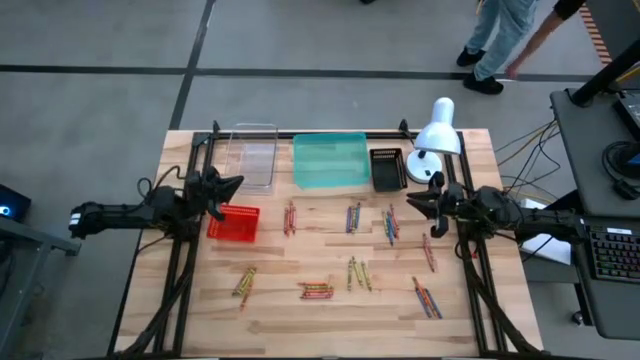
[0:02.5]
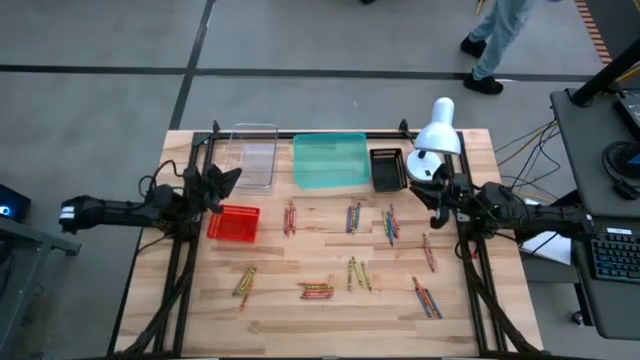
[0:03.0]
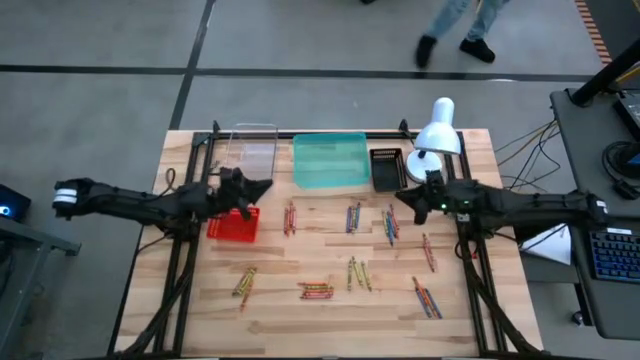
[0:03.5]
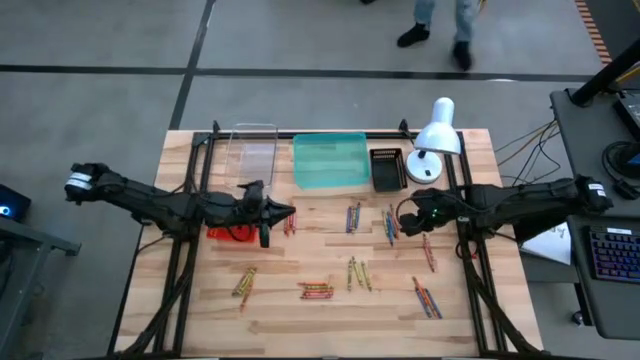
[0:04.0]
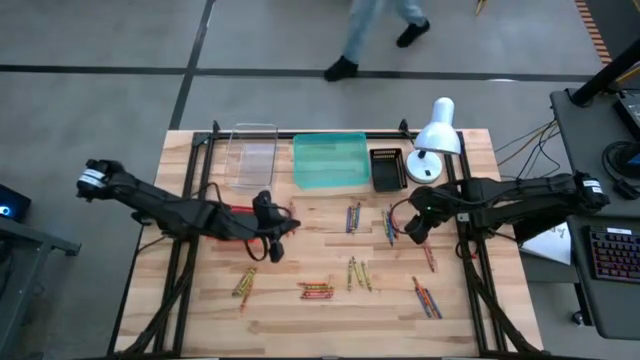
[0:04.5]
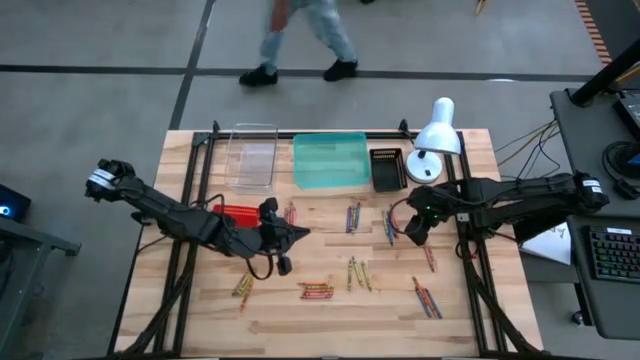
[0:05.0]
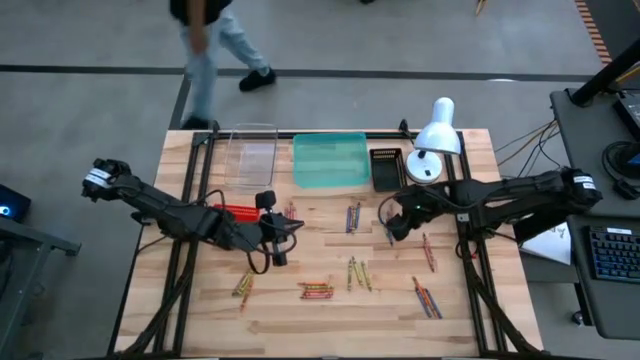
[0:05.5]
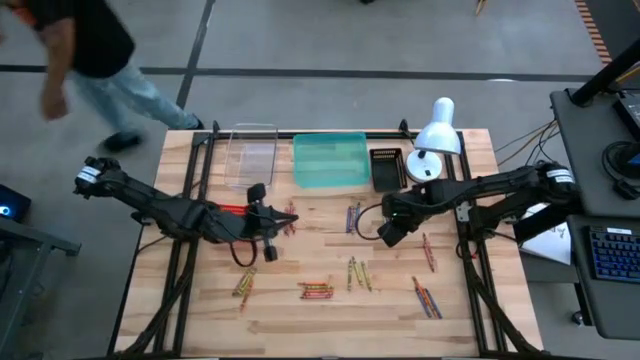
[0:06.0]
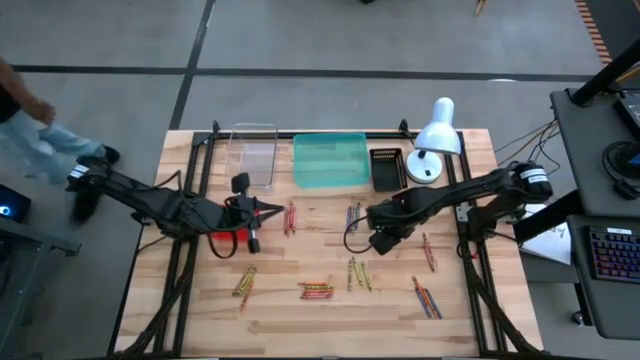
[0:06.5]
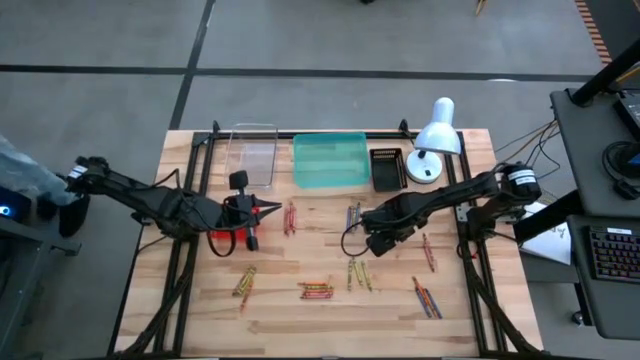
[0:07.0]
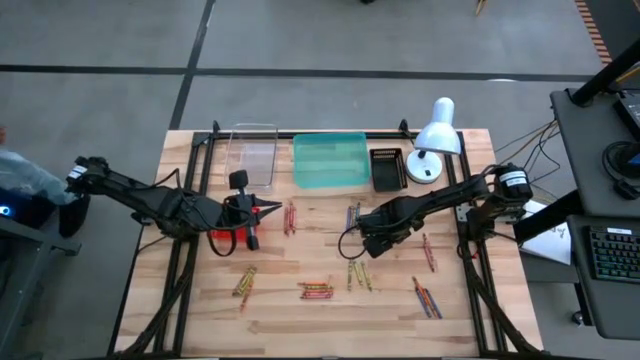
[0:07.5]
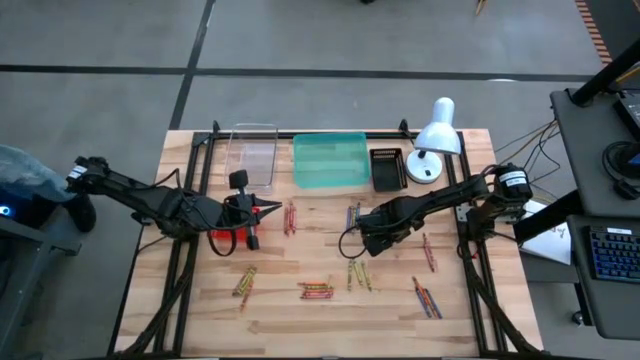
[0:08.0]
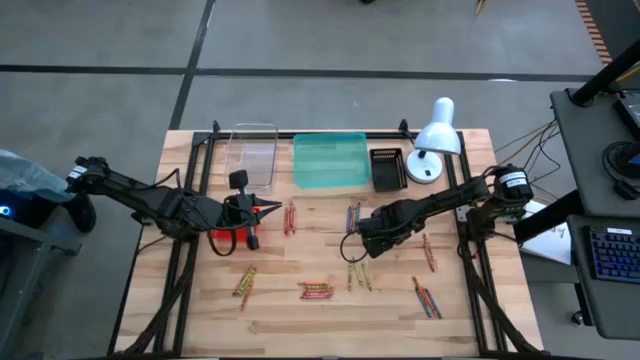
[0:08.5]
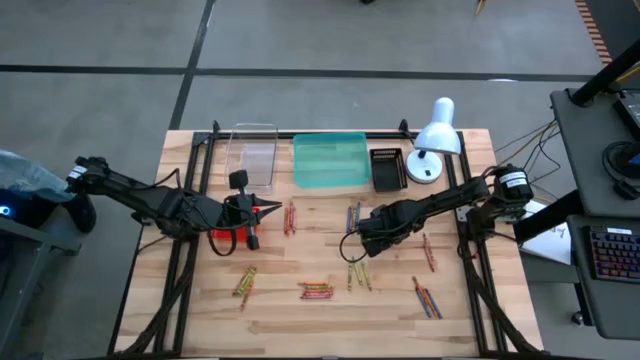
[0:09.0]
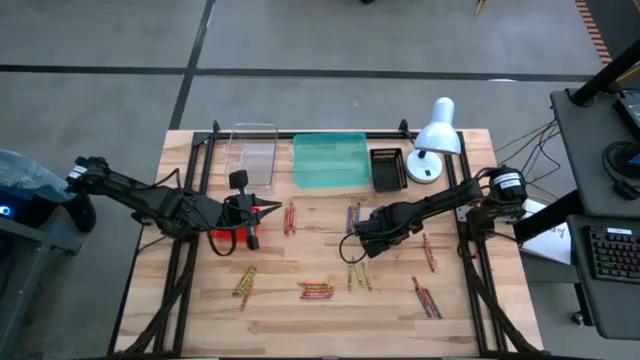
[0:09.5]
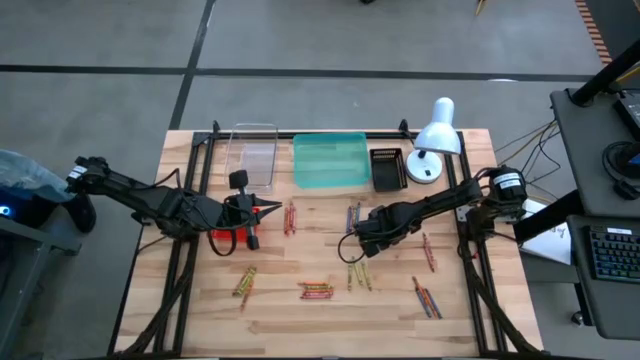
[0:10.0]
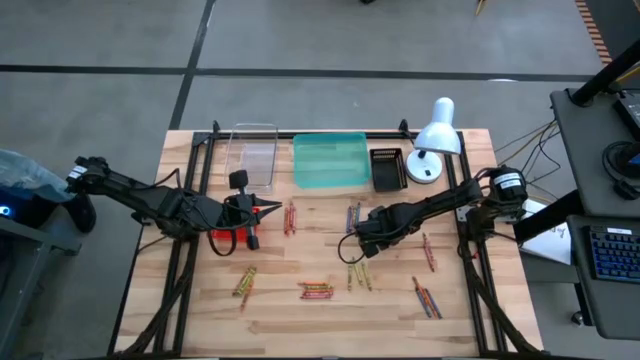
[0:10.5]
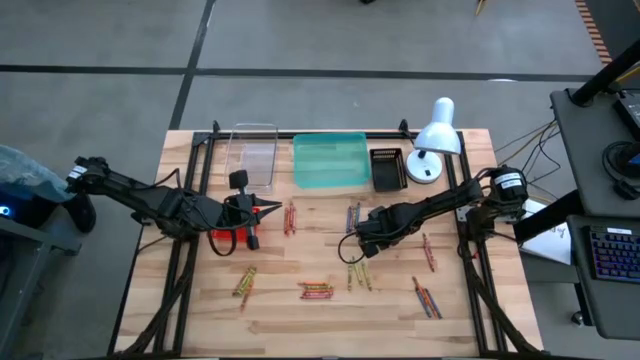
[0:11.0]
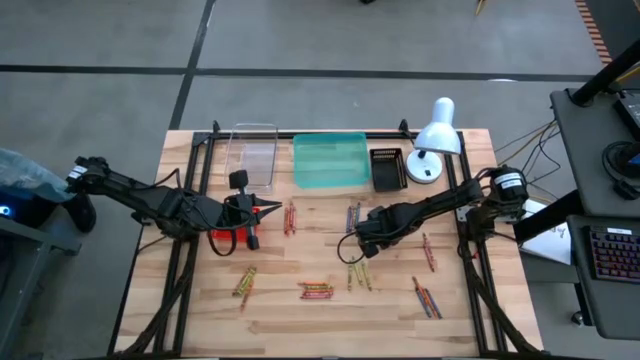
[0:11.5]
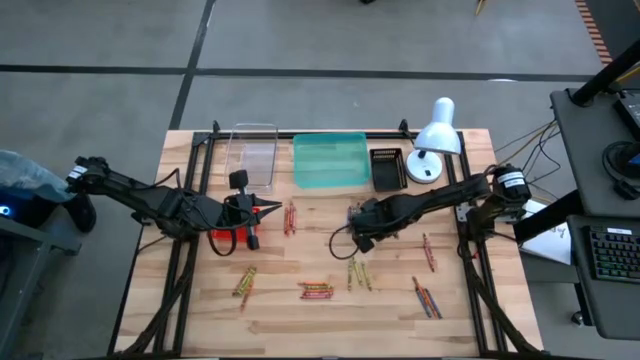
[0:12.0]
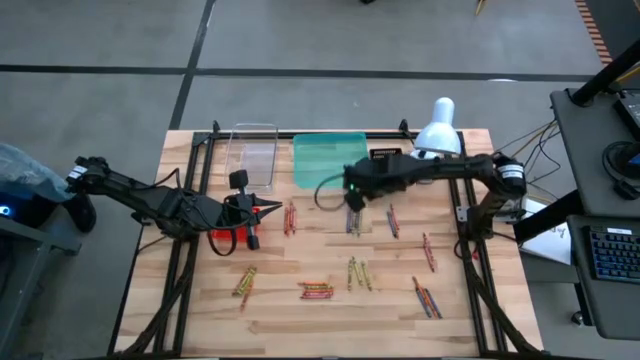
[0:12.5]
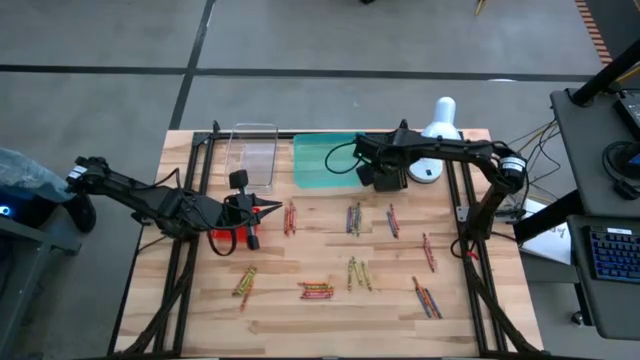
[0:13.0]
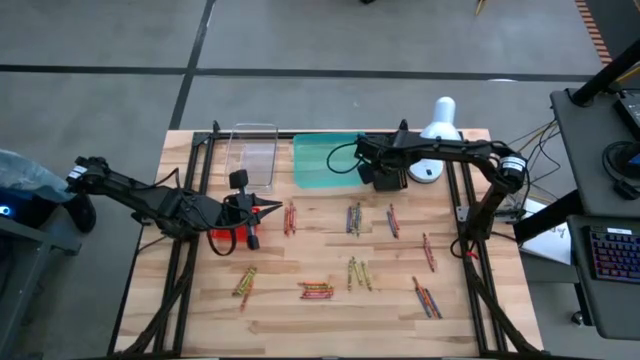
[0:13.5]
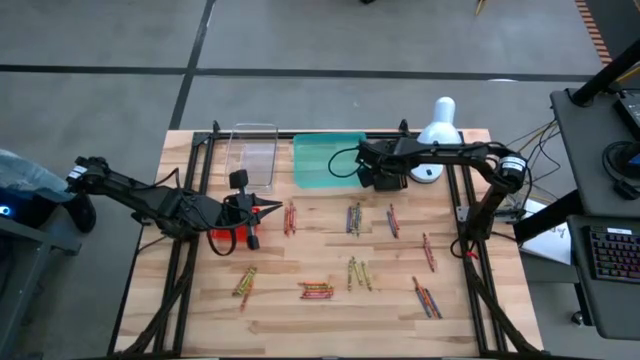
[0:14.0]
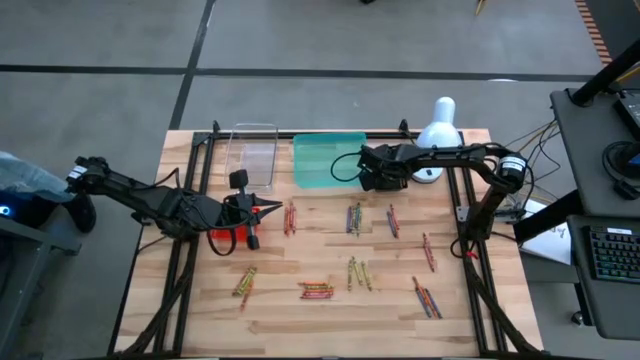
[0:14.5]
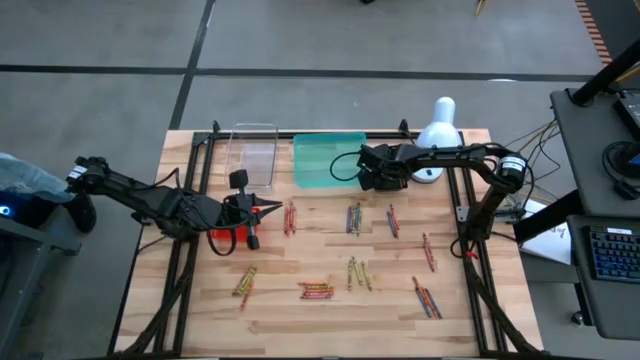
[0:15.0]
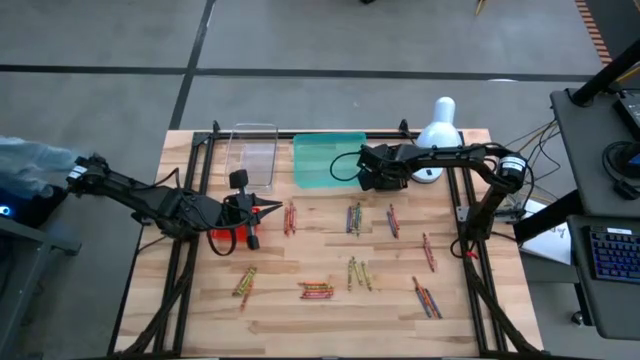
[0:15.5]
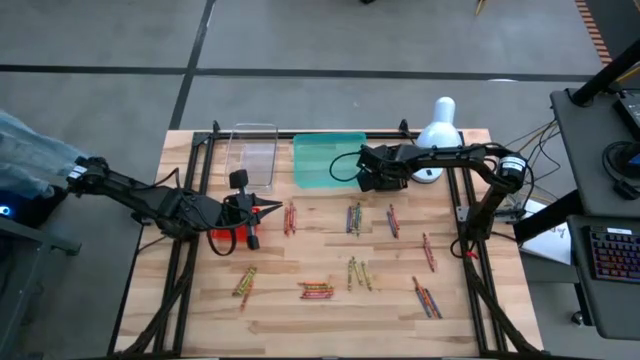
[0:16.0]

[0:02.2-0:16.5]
Task: Sort crayons
Put the blue crayon into the black bin

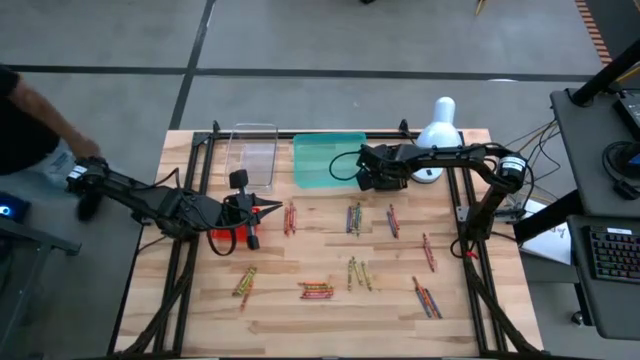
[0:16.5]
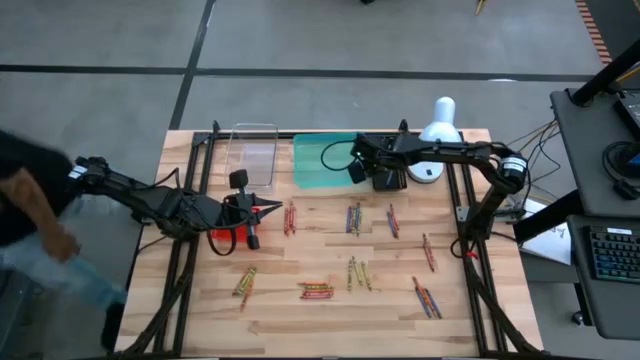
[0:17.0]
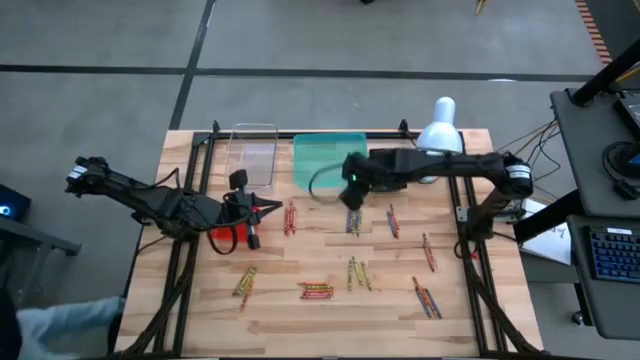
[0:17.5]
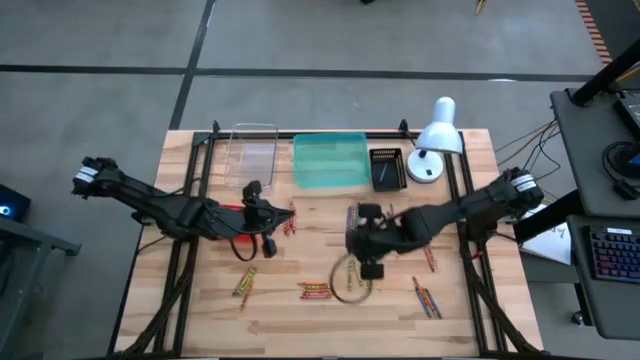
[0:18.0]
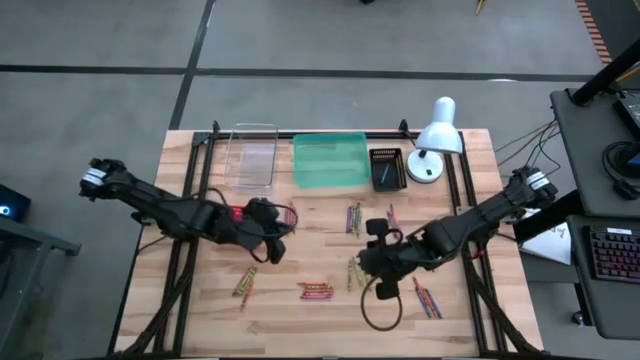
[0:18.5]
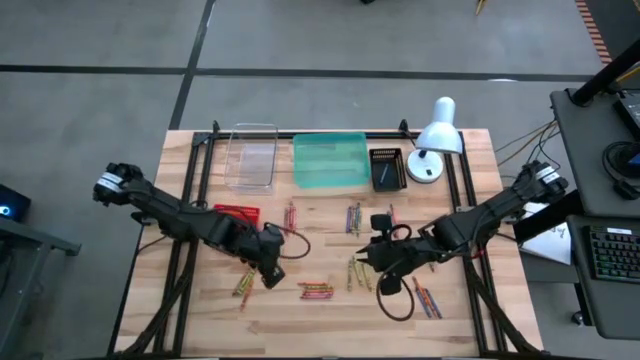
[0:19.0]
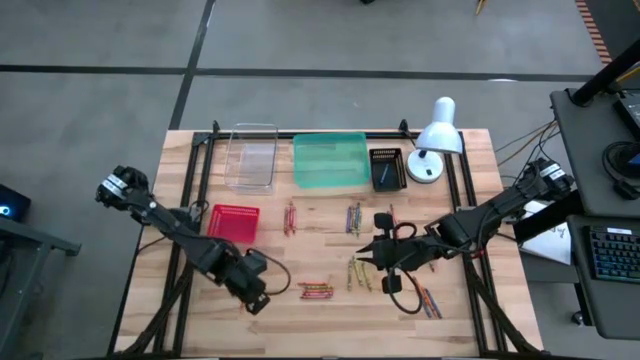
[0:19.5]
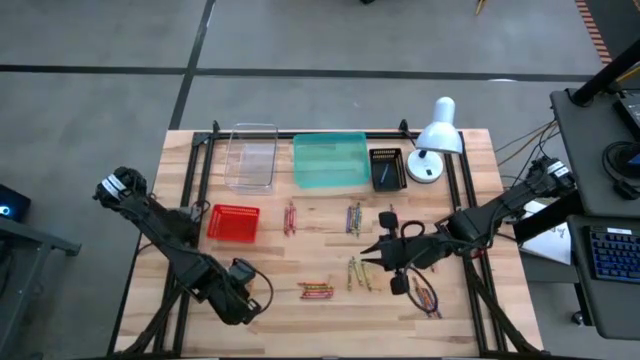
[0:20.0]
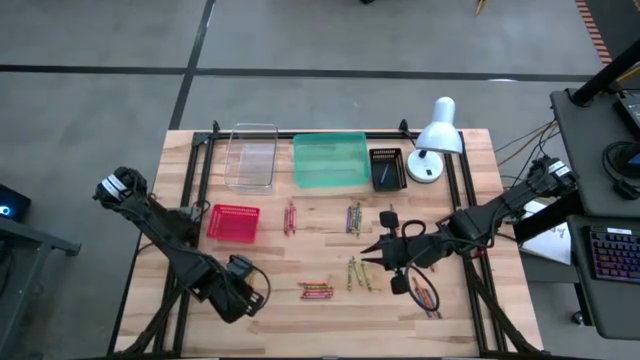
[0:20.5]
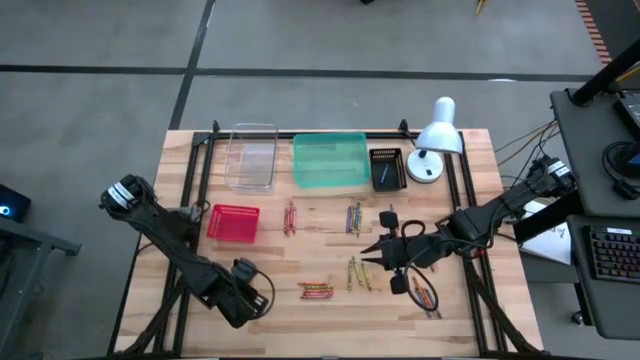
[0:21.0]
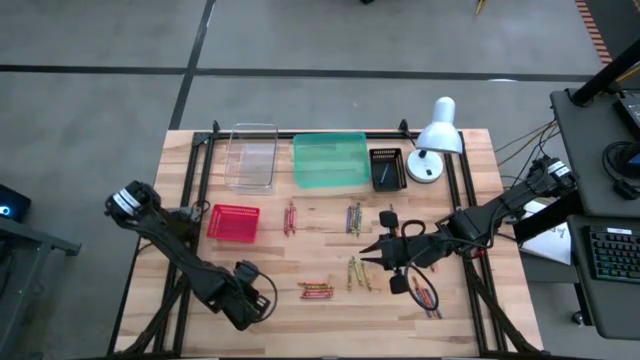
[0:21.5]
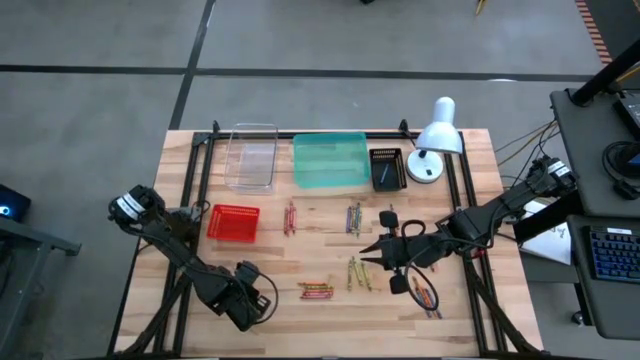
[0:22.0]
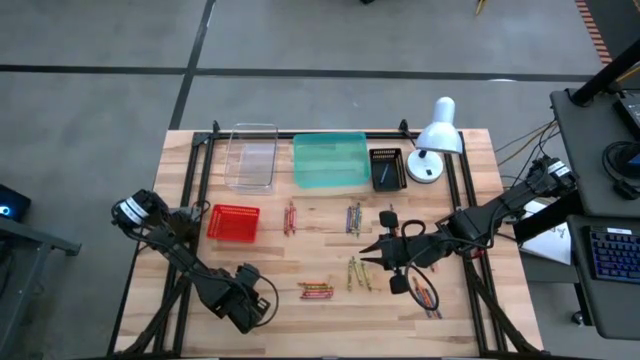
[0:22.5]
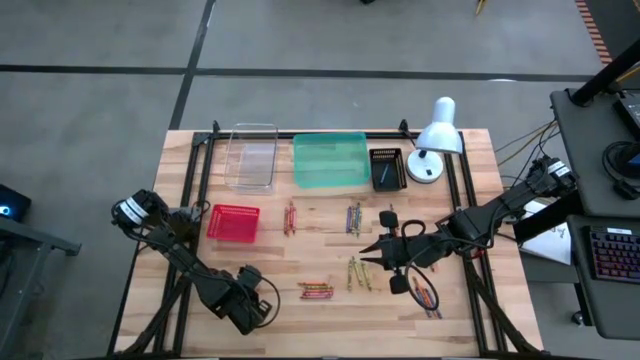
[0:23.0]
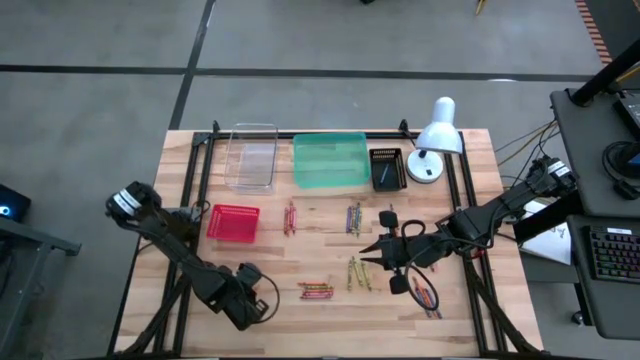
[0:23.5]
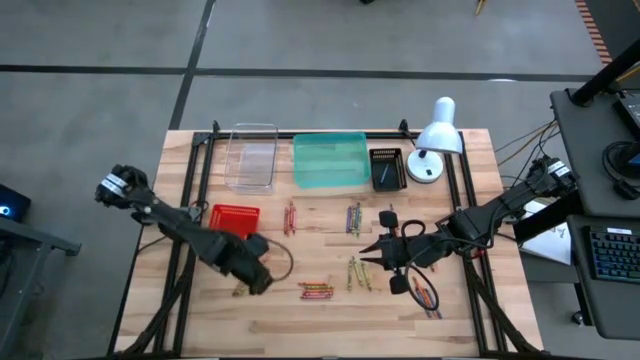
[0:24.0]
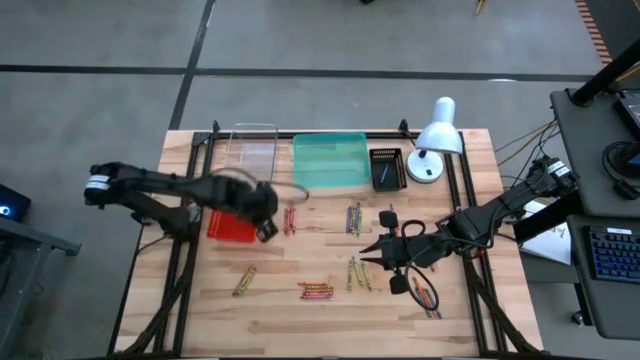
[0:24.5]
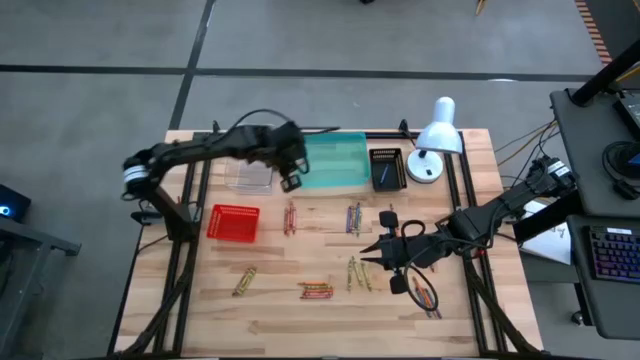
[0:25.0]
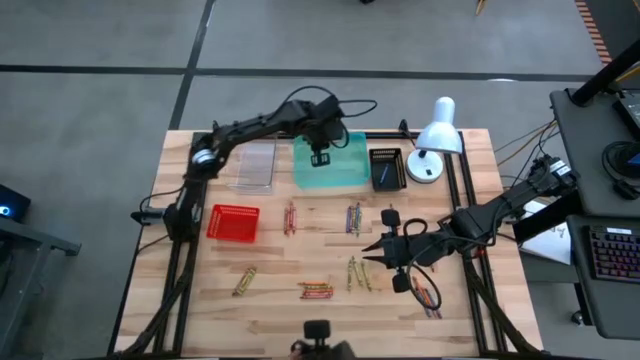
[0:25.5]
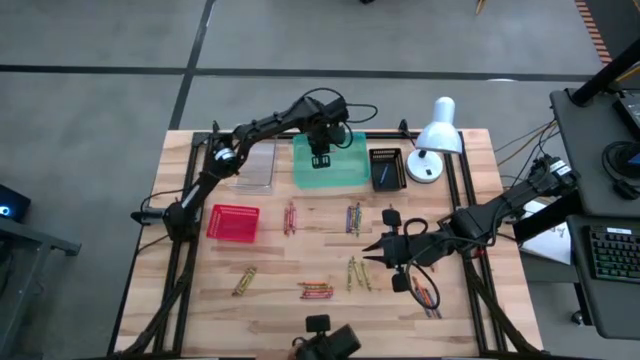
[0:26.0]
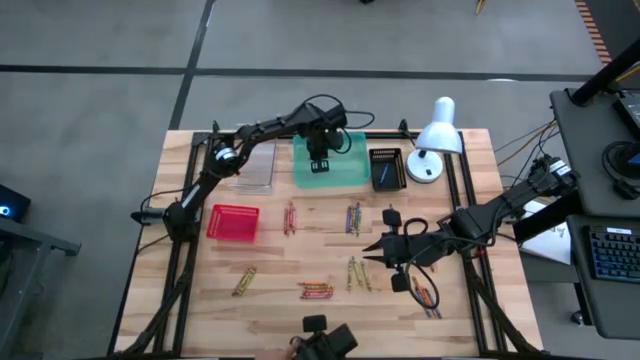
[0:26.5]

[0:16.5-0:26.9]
Put the orange crayon into the green bin
